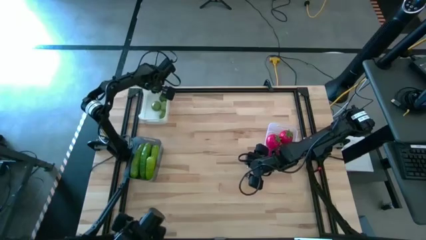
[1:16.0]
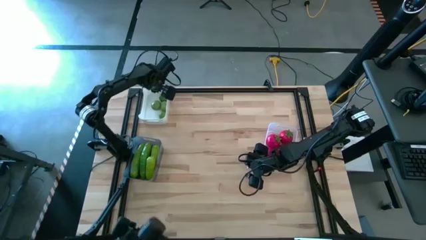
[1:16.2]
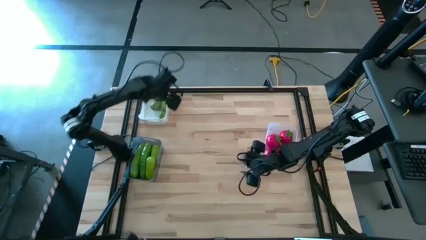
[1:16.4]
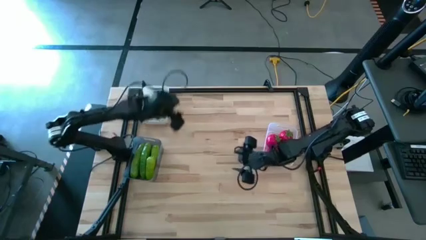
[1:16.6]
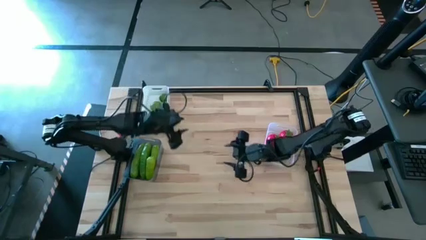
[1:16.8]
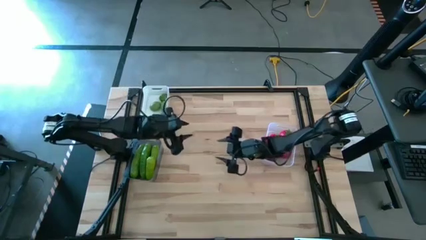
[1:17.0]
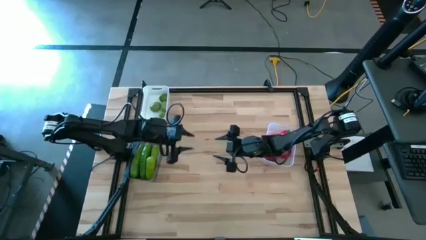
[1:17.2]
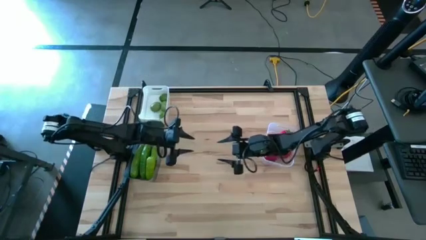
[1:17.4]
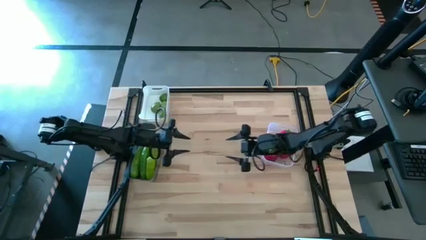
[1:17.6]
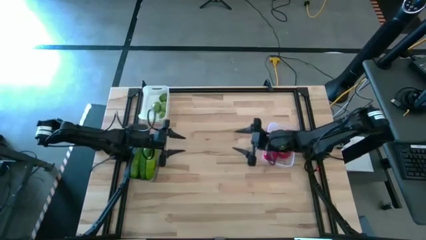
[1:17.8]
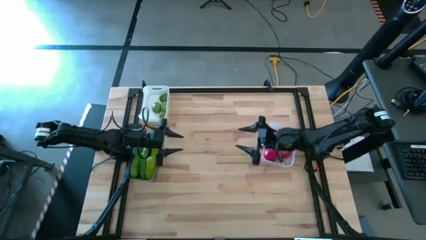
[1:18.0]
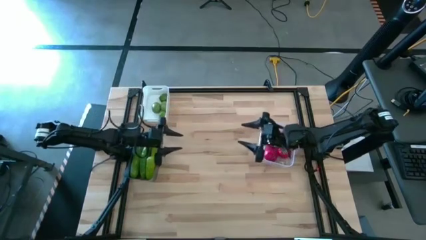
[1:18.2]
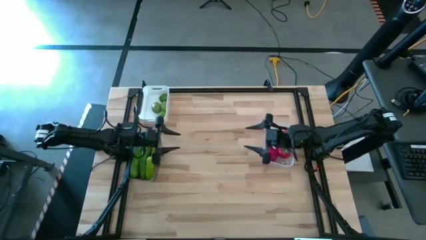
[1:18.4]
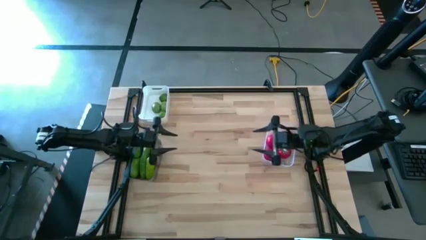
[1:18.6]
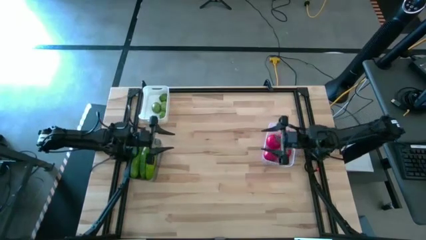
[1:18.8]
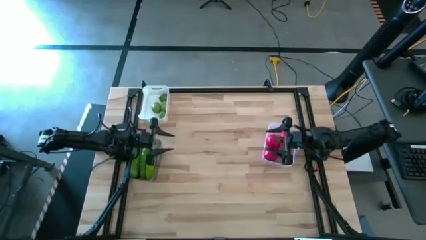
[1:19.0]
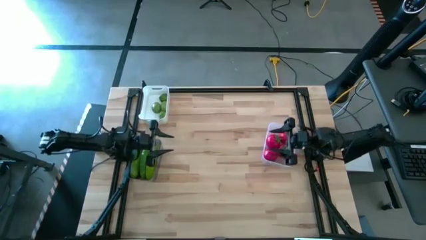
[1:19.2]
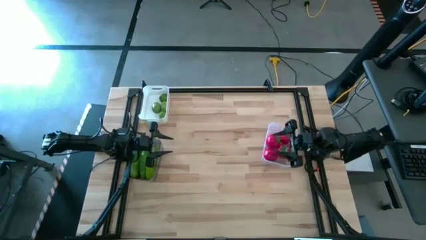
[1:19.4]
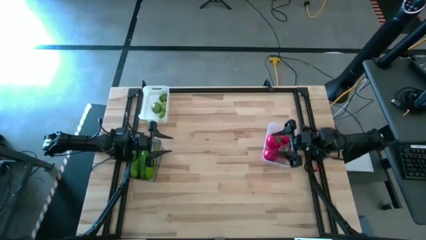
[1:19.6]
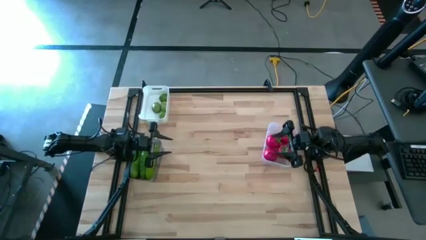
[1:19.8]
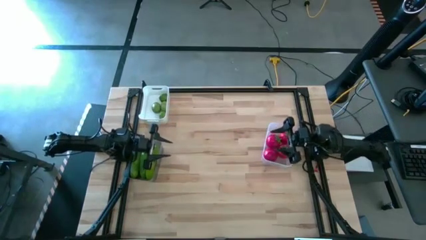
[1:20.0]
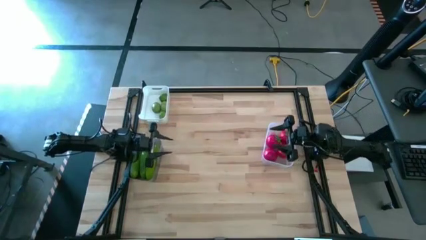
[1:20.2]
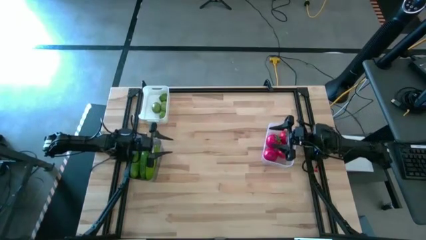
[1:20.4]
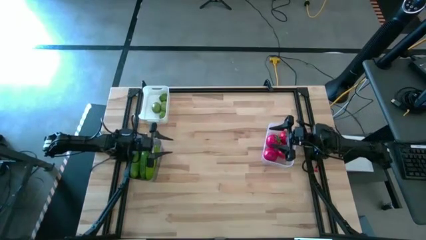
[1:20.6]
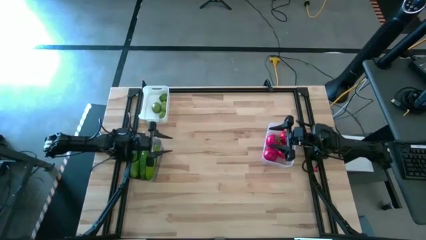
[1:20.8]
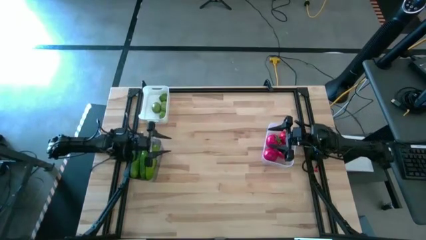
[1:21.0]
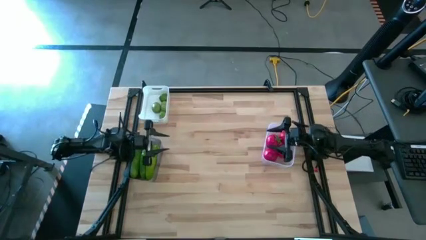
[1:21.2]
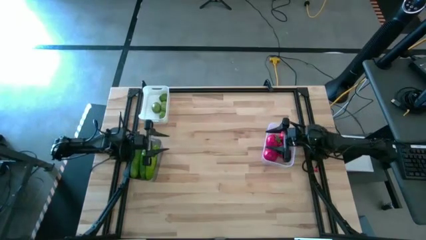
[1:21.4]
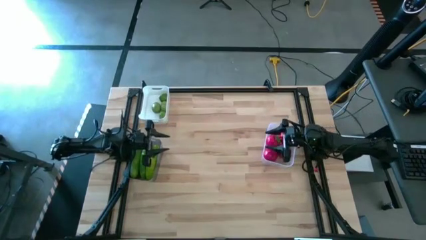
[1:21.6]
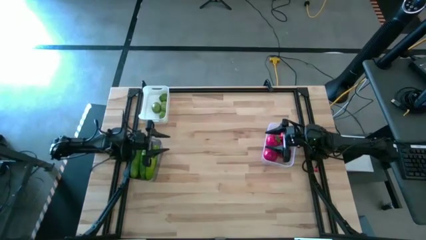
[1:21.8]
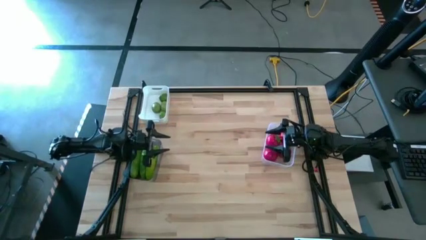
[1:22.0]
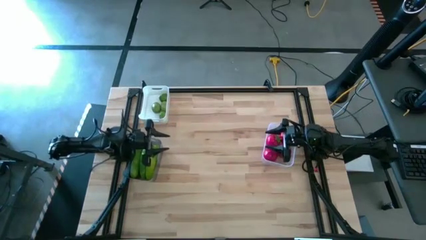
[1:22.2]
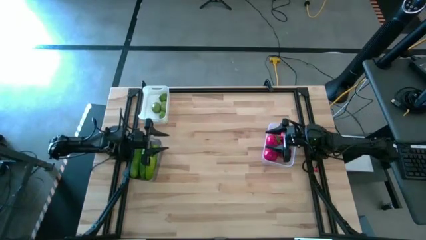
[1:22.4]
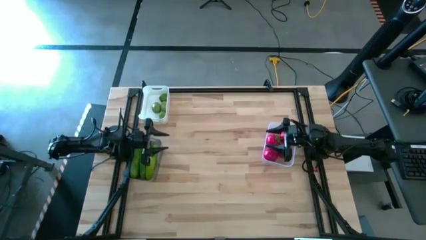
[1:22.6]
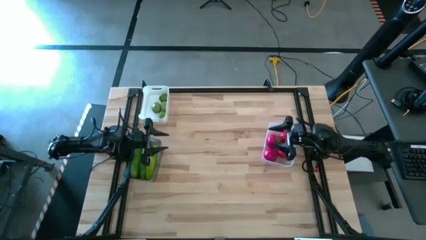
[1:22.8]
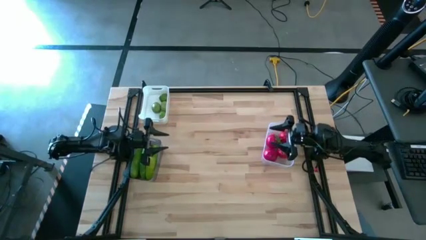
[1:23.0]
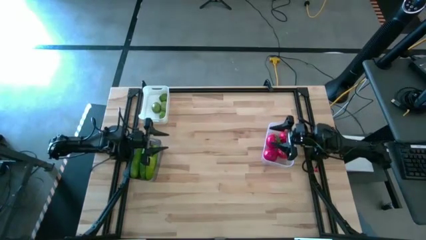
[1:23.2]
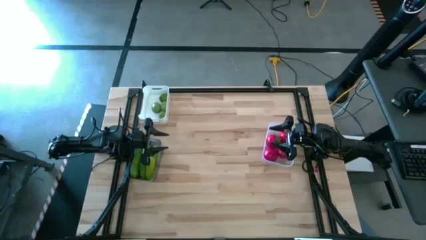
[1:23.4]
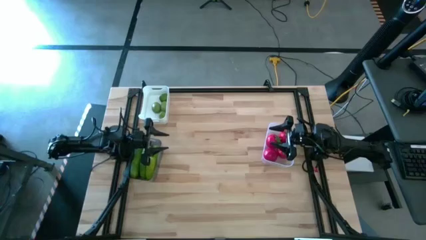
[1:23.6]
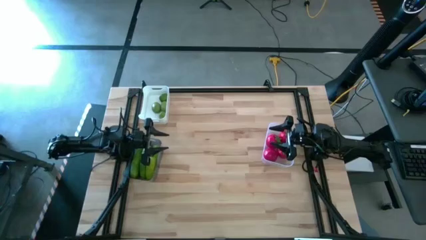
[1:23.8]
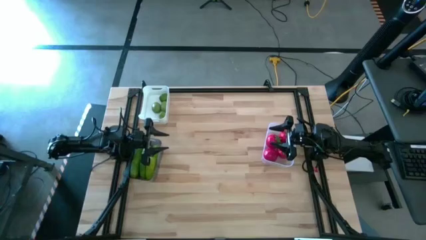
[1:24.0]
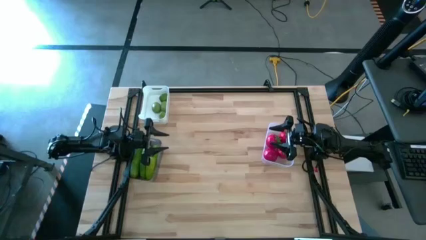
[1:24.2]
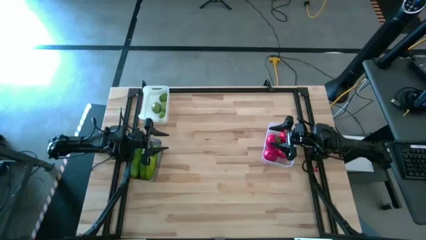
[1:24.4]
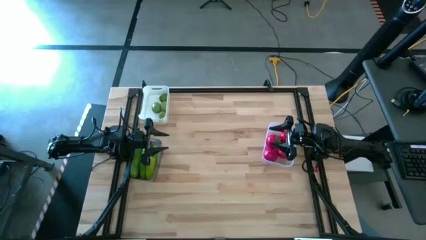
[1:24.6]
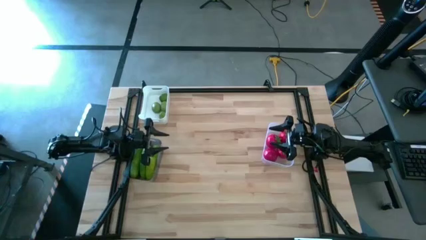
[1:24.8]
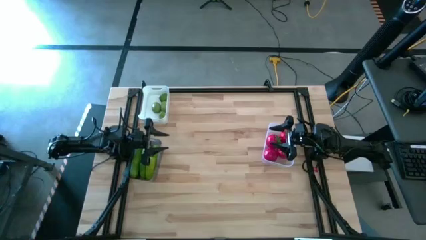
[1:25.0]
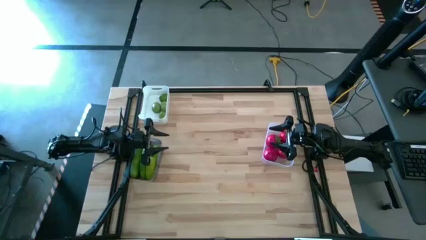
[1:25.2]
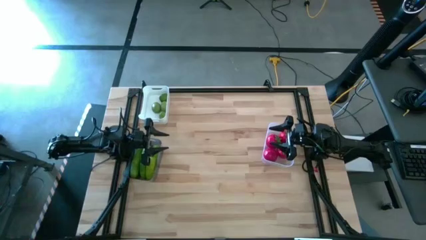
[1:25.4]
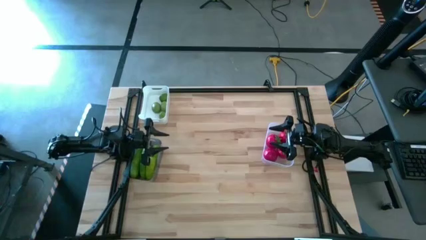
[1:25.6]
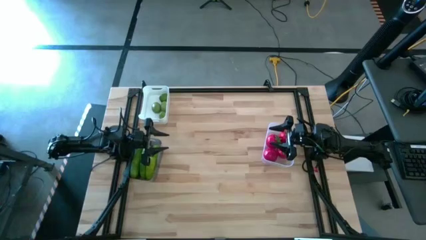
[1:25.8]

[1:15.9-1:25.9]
Task: Sort produce into baskets
Return to Home Position

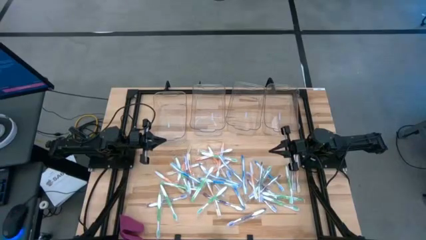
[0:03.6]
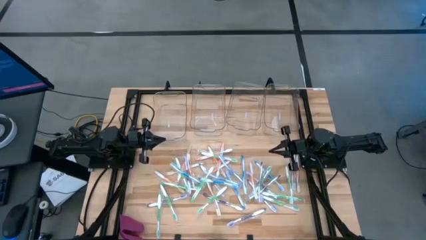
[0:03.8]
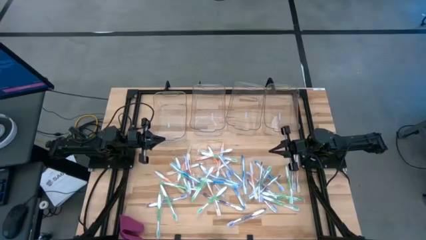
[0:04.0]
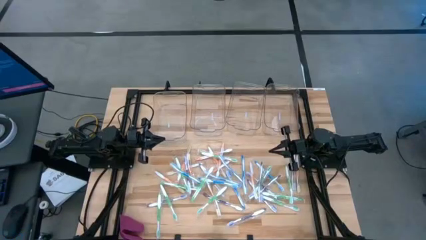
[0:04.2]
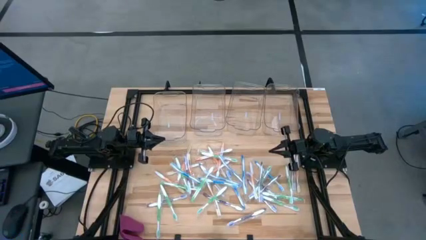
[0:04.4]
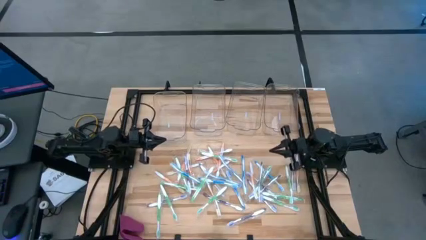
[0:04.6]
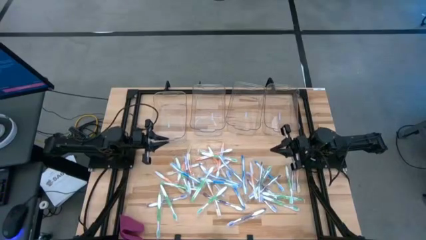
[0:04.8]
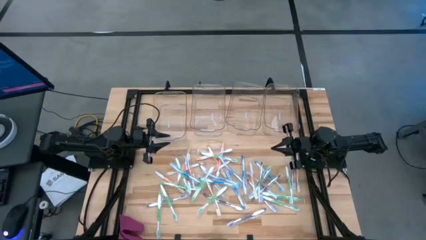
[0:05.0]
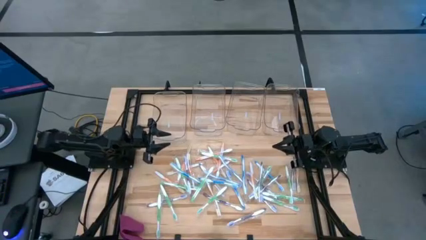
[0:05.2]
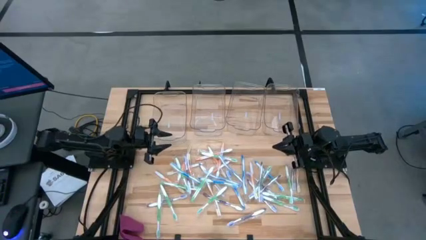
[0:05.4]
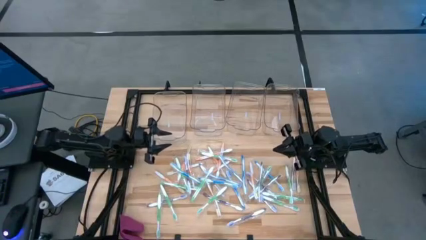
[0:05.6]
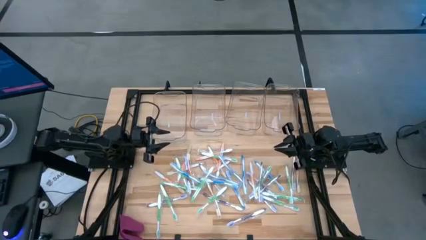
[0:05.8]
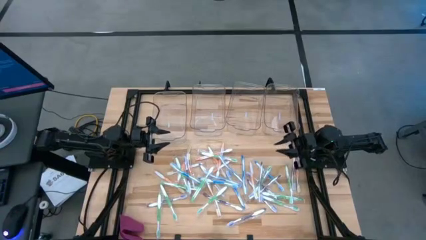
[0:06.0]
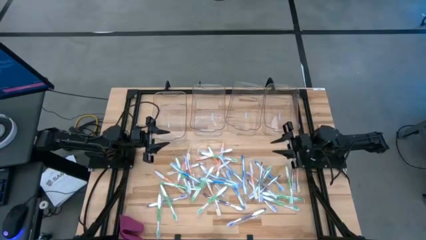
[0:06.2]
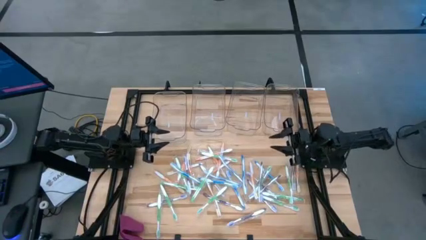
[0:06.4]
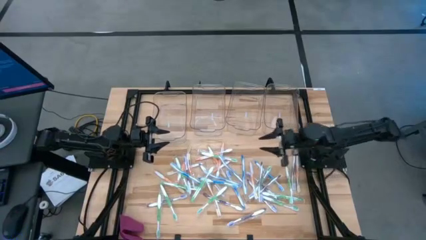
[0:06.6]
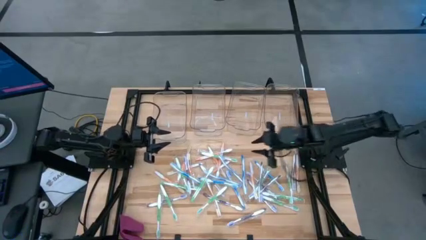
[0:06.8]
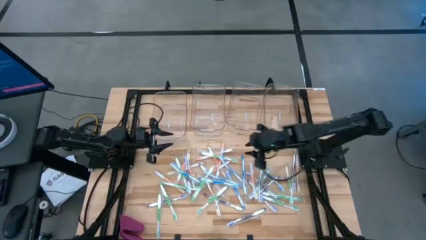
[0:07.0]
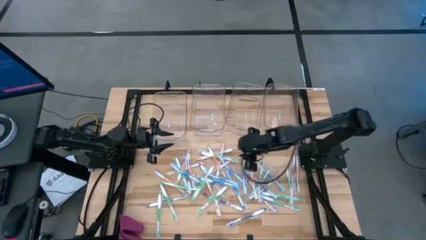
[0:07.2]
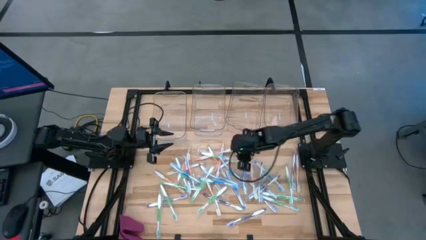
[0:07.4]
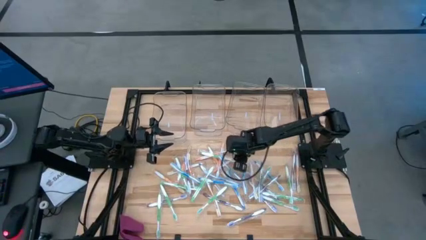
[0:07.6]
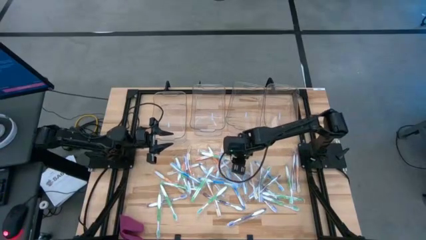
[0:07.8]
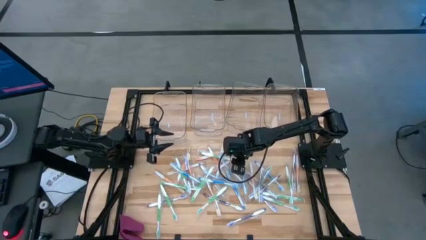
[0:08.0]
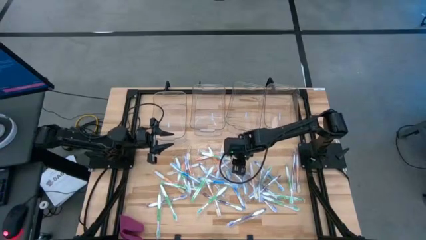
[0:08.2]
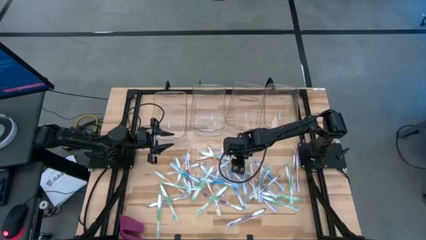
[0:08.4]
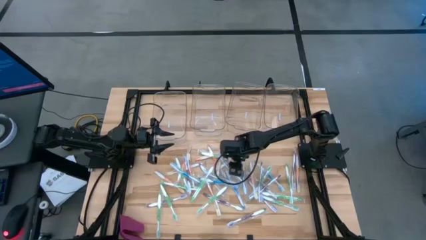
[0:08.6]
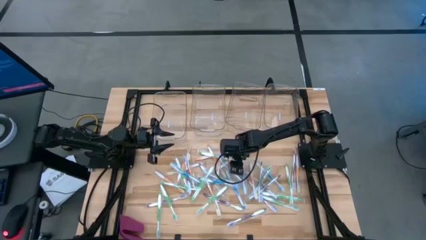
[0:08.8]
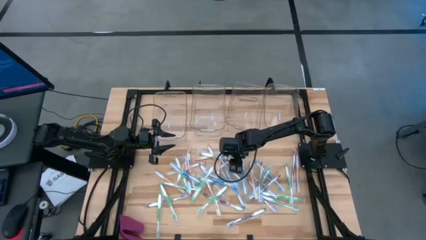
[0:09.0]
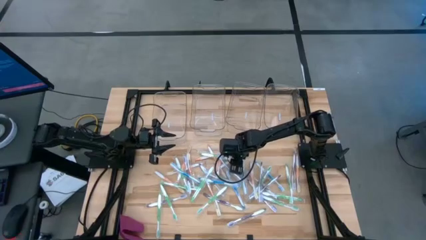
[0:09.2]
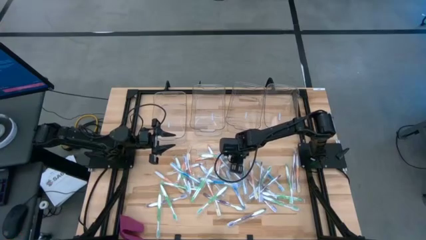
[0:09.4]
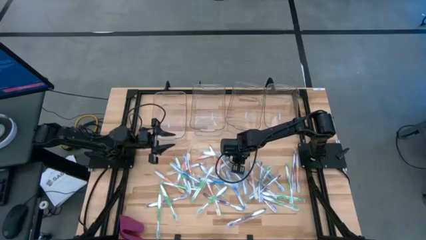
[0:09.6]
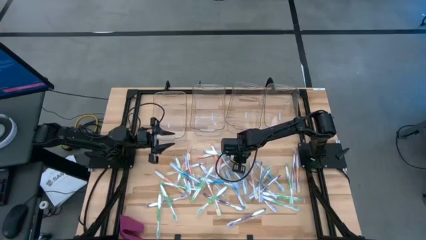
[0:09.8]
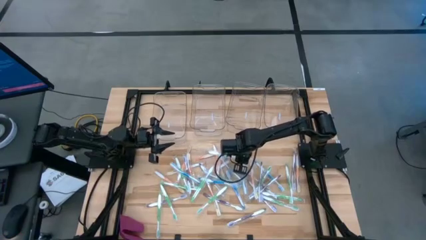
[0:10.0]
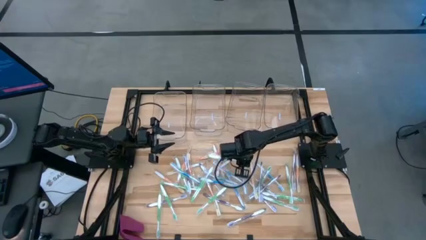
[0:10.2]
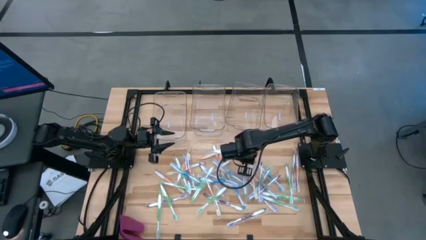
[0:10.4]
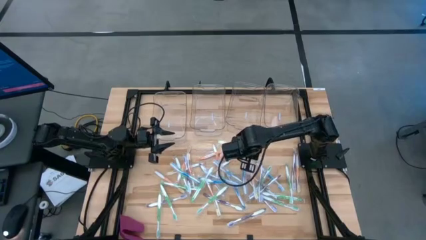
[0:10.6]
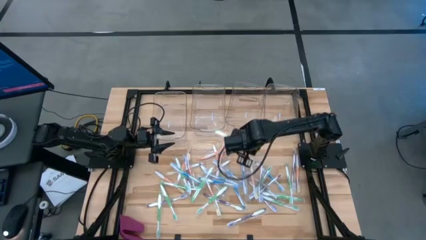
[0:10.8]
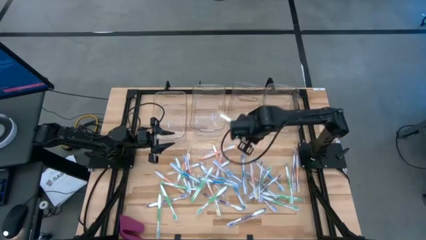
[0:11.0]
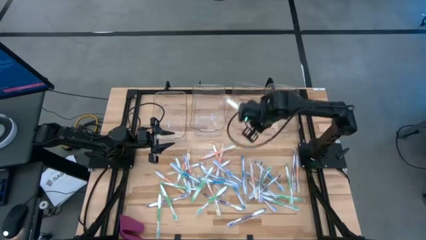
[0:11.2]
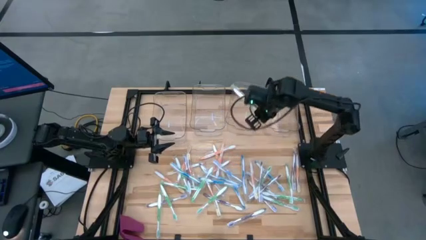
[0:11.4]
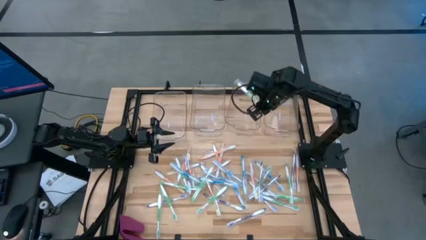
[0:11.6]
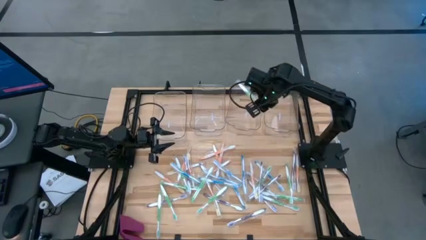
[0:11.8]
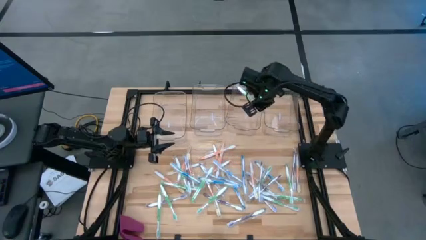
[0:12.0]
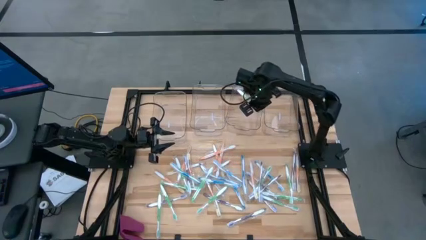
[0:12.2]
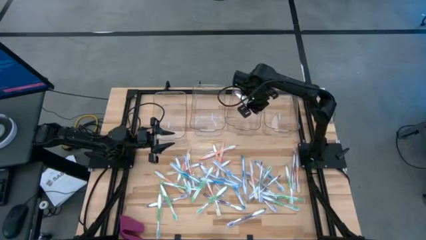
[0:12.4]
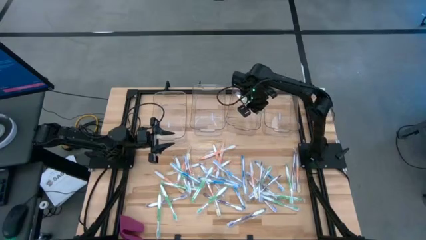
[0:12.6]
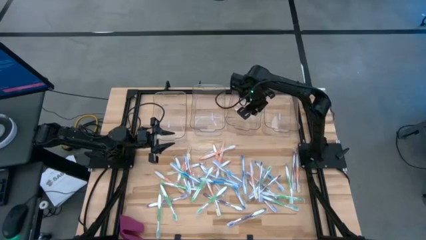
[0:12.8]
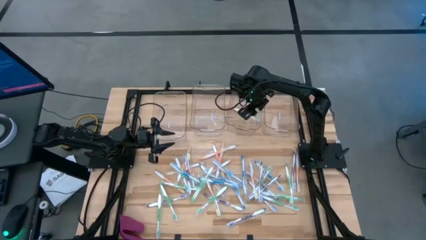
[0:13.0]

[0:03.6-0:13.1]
Task: Pick & Place Toothbrushes
Put the green toothbrush into the middle right transparent bin
